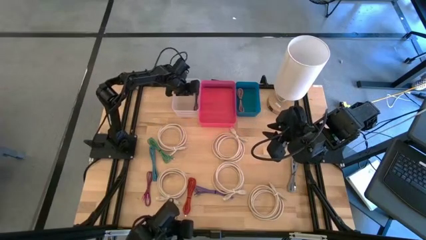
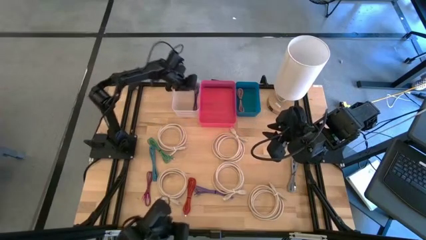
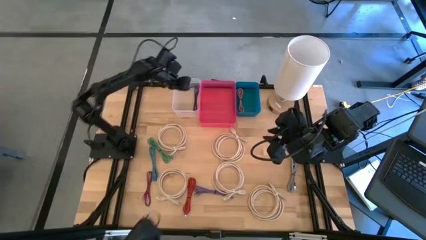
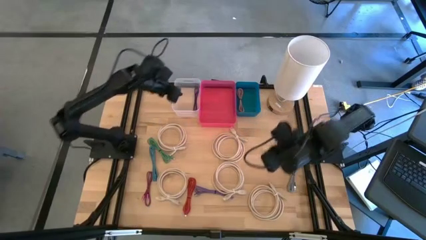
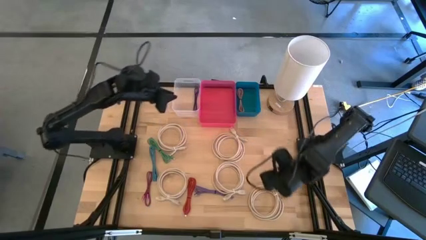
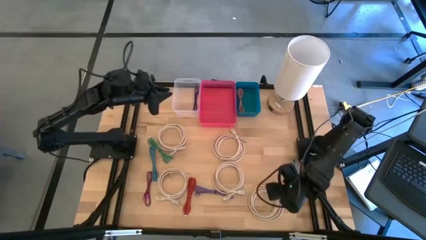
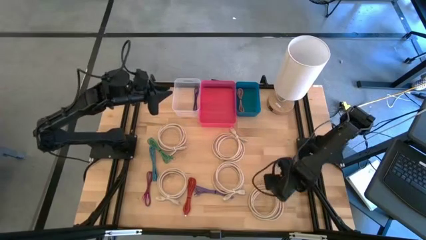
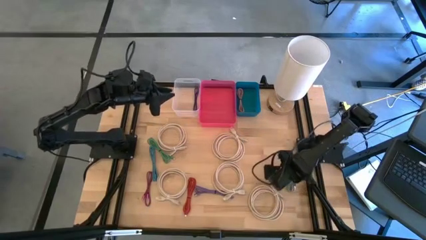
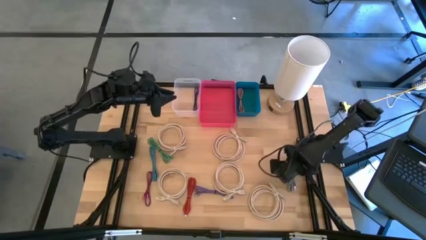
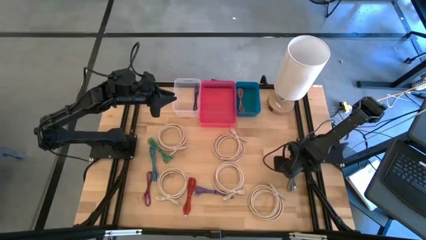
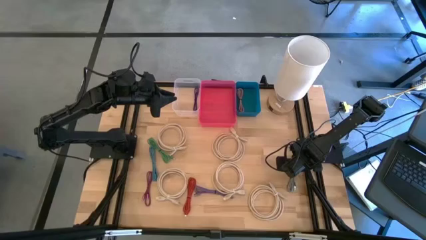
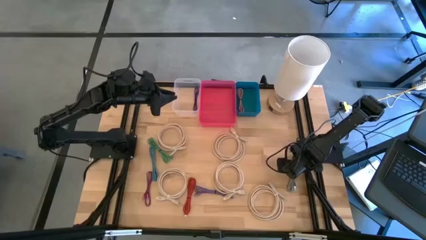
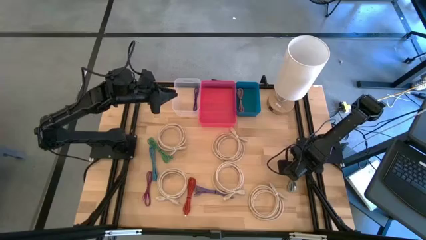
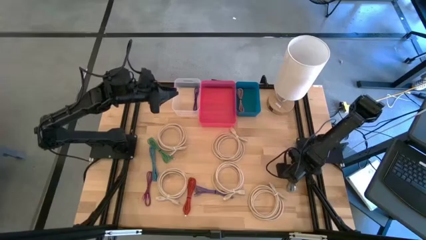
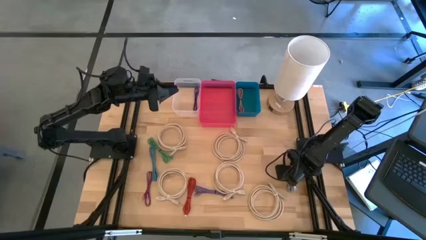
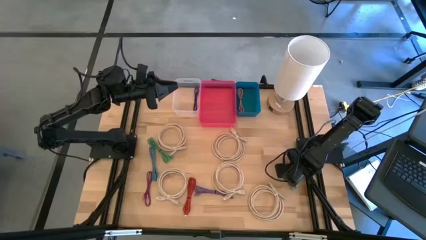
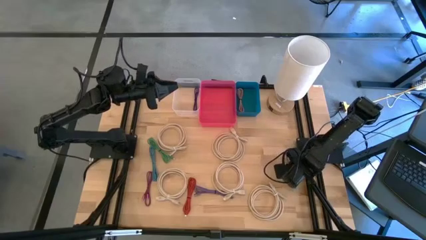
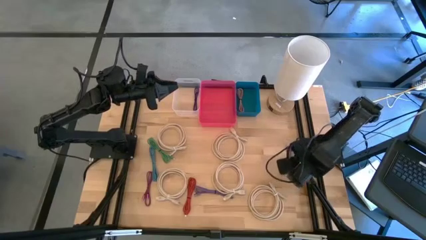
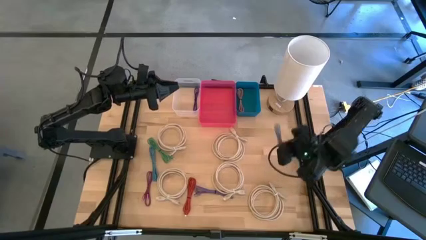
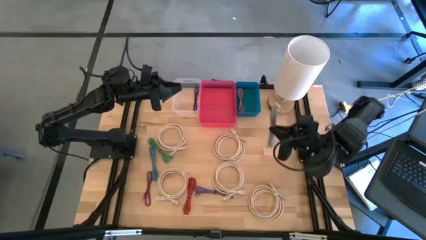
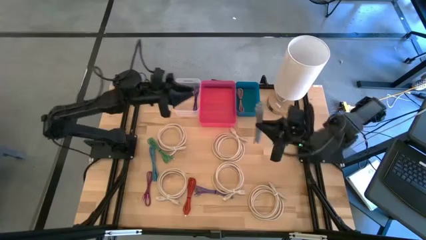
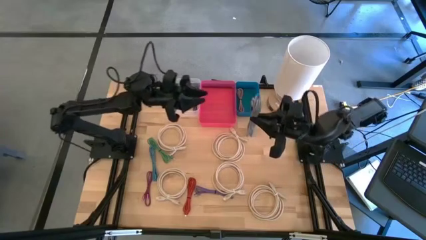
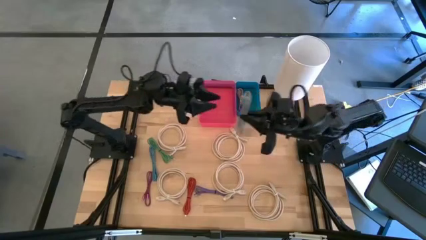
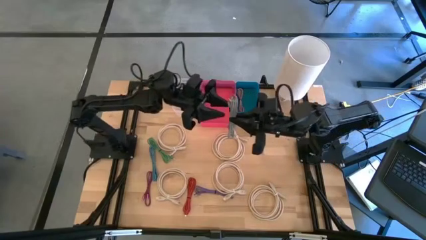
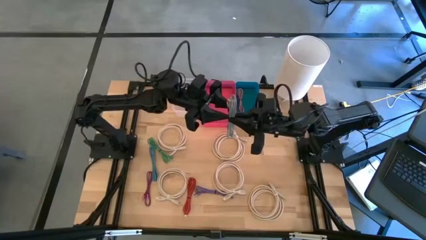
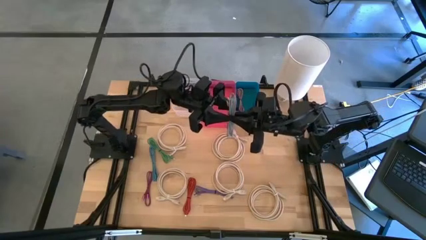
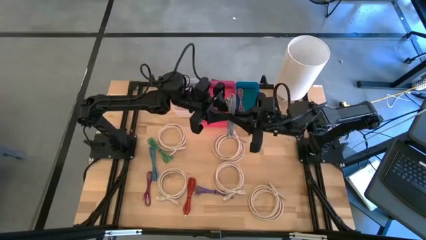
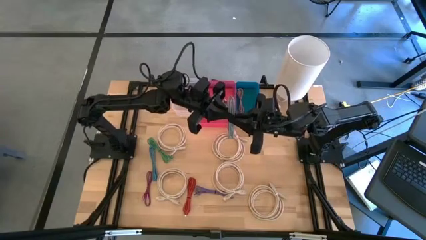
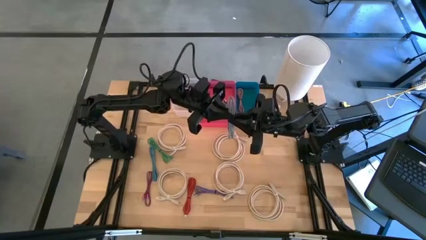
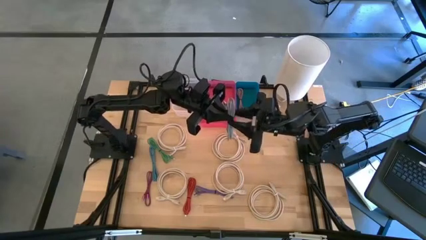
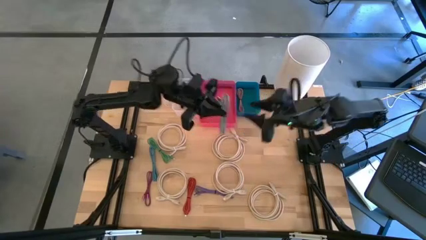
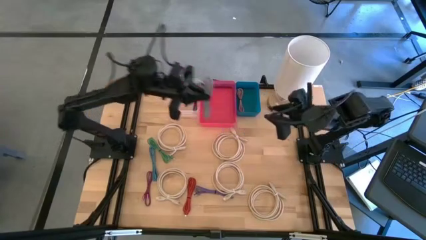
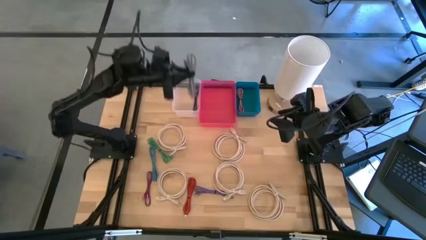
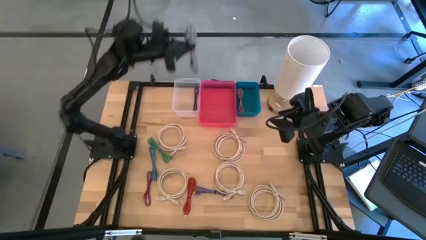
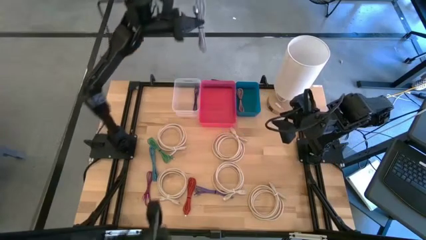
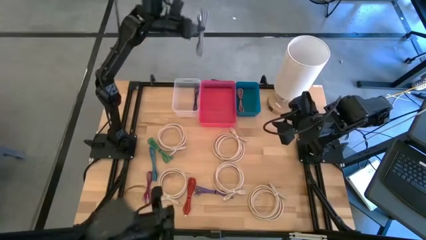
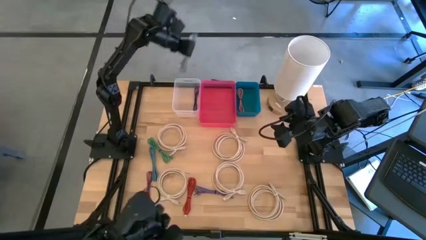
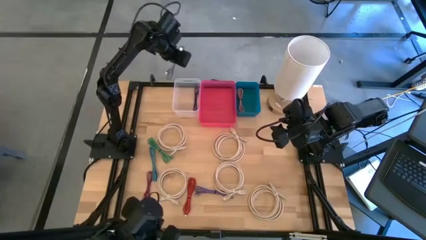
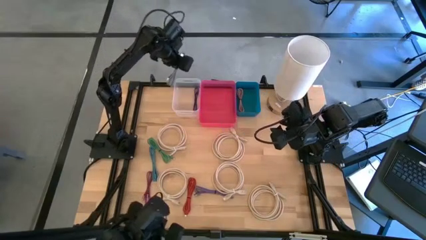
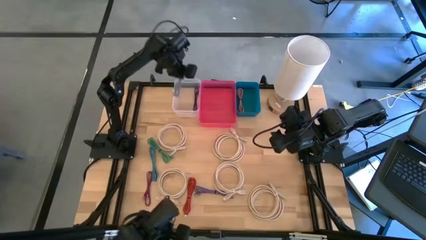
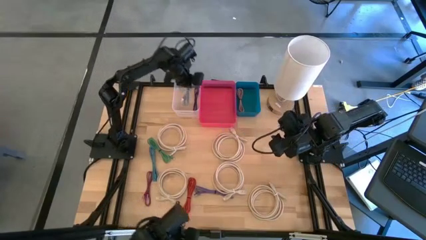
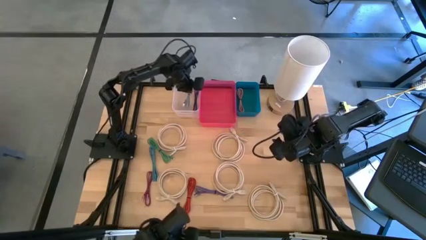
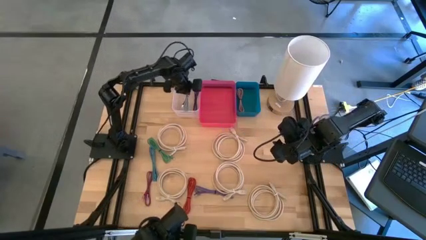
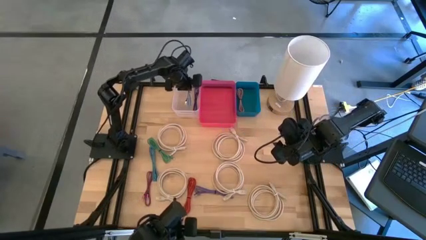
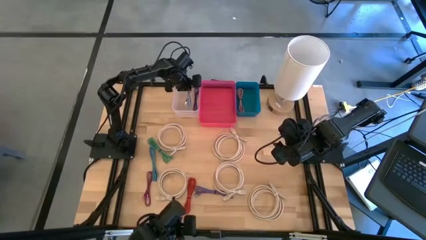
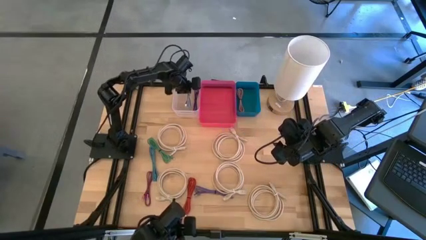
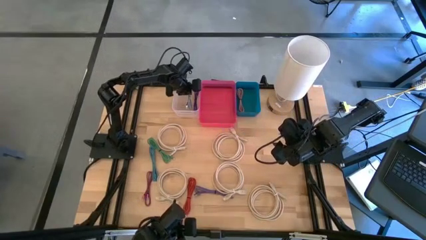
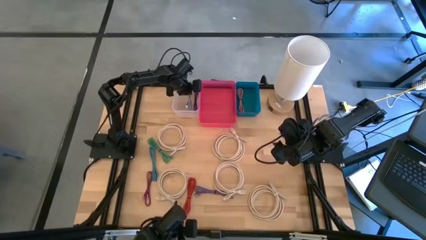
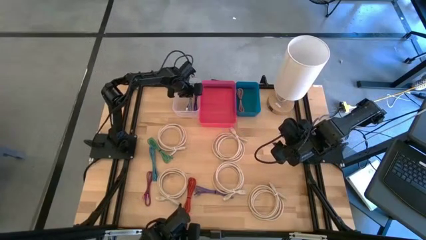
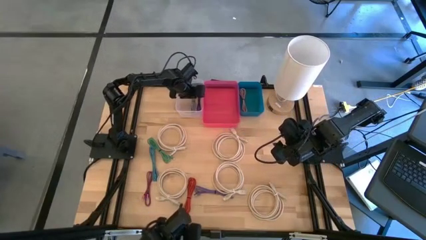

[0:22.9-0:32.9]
Task: Pick & Place USB Port
Put the white and black USB cable into the transparent bin

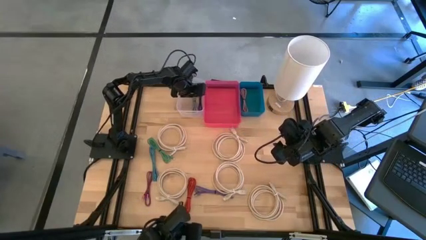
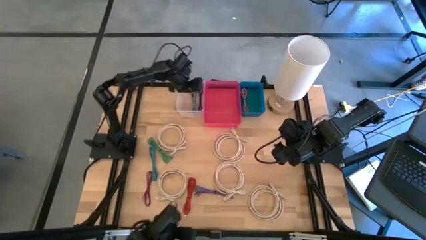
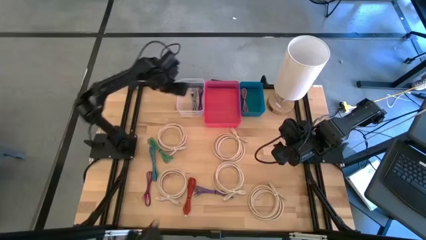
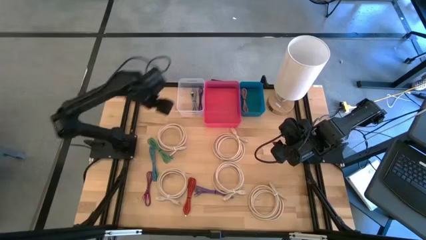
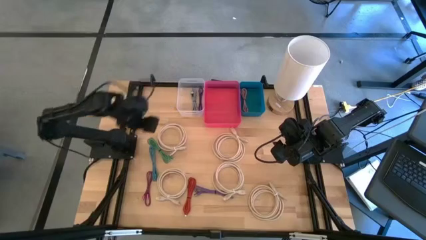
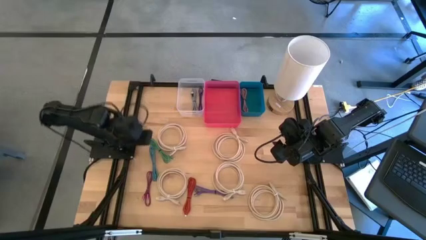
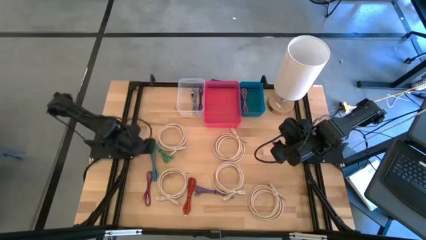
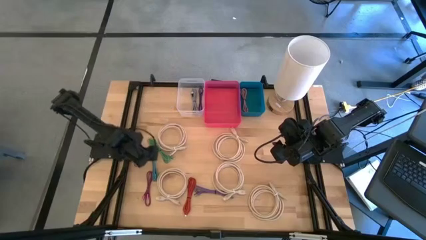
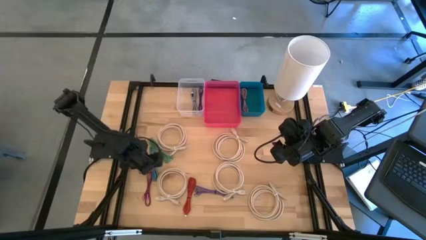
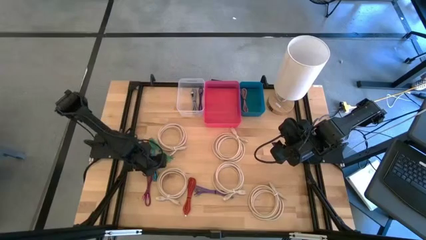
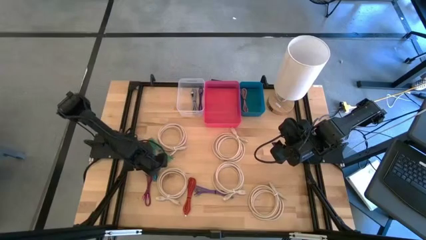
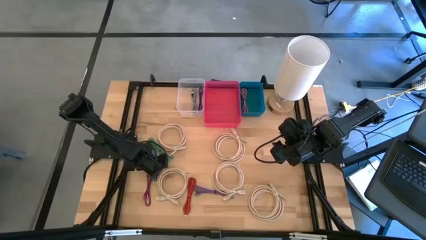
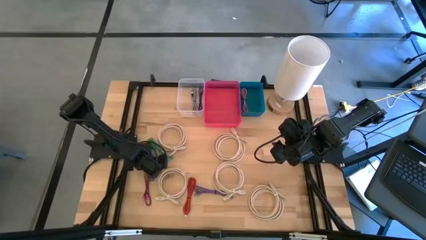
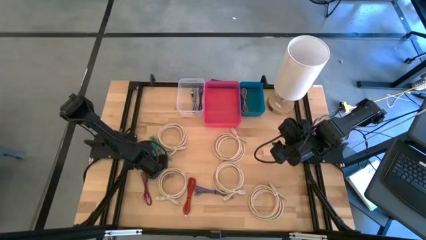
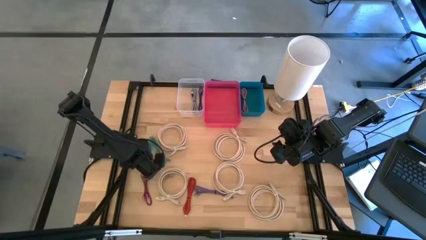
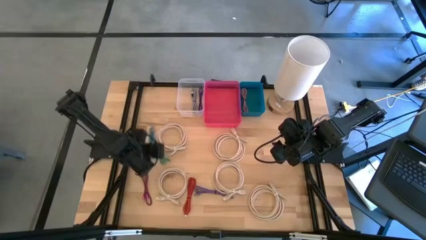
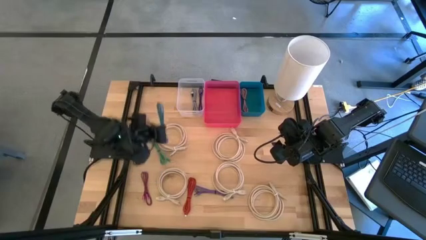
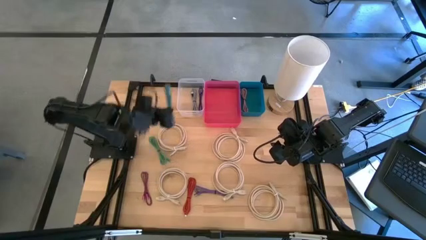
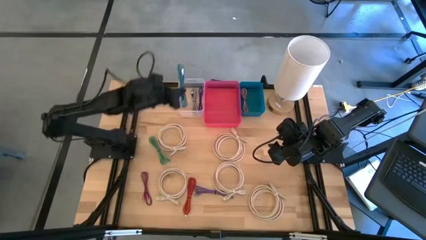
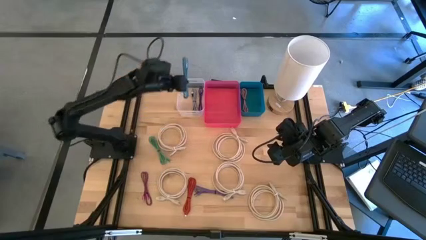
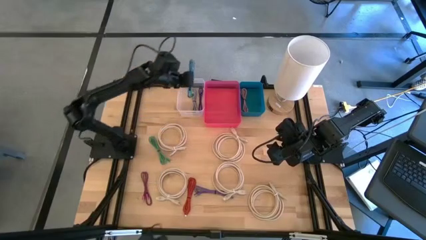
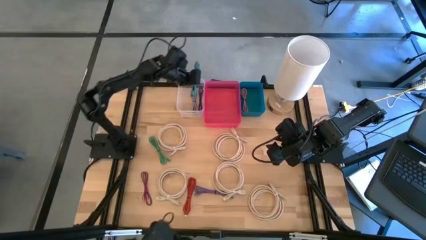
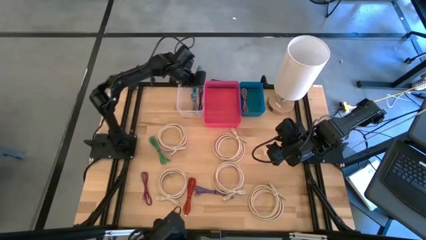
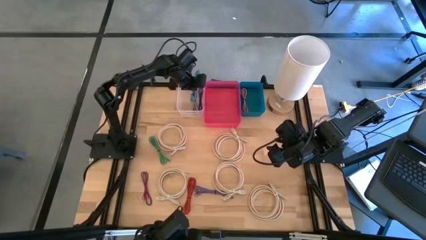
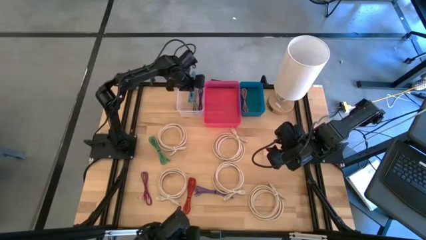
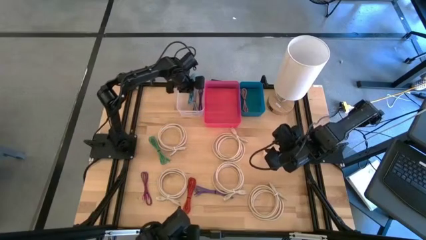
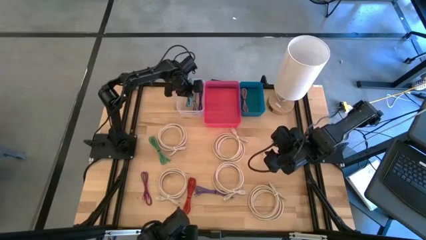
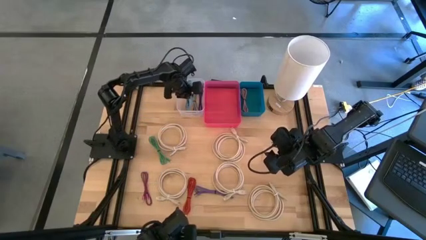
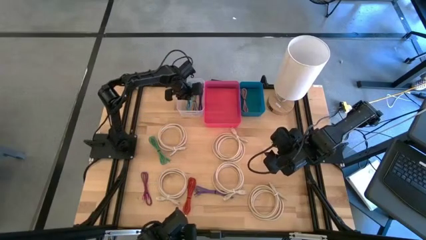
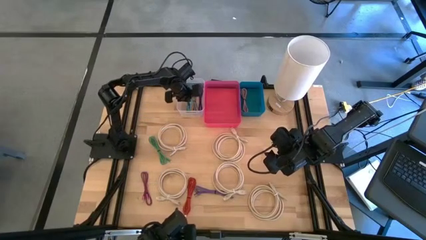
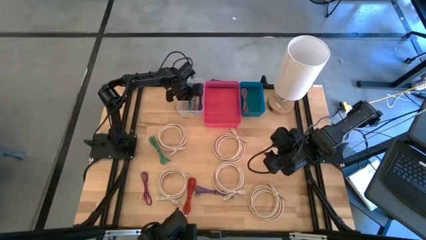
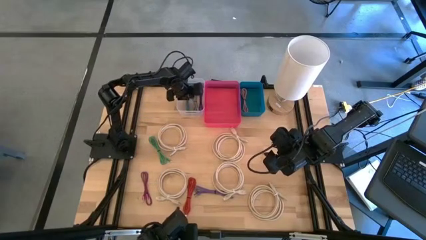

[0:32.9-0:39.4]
Put the light blue and black USB cable into the transparent bin

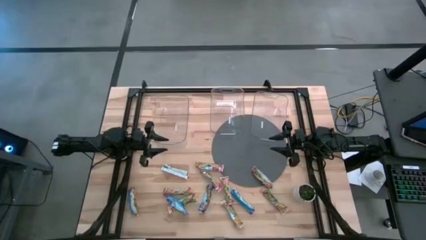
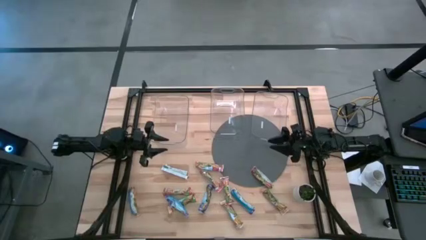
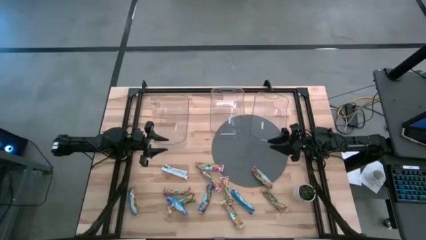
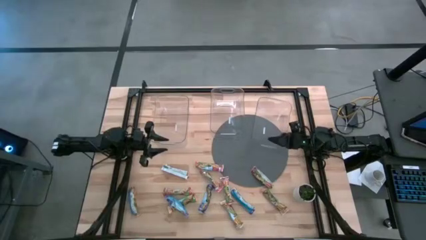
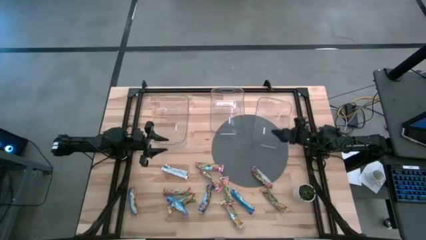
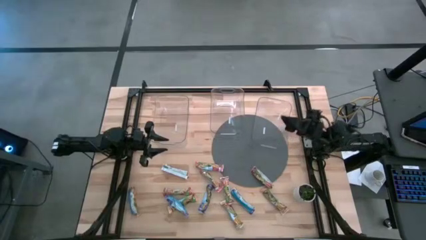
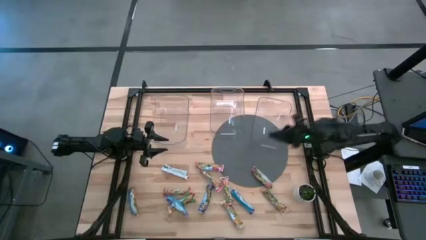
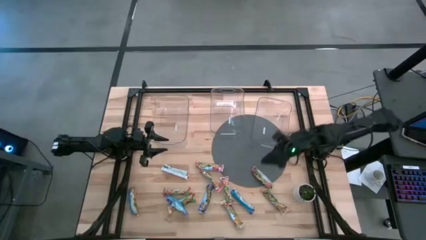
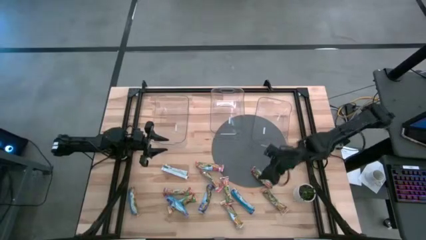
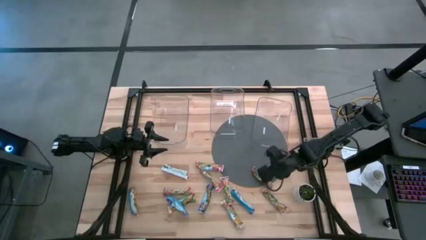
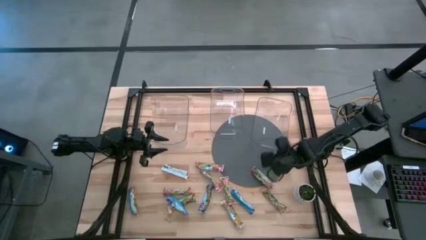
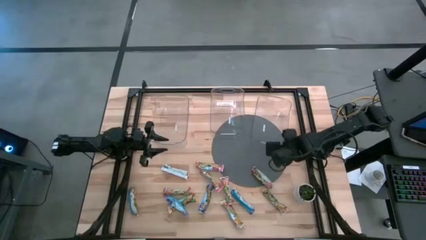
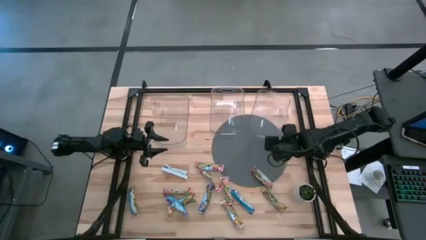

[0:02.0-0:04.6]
Task: Pick and place Granola Bars by type
Adjust the right transparent bin
